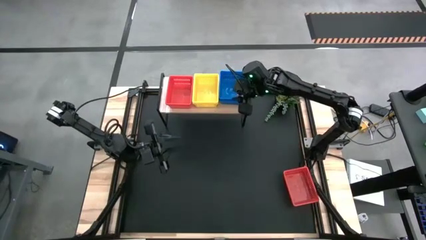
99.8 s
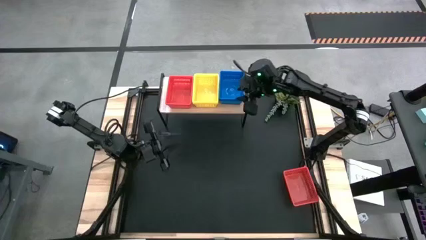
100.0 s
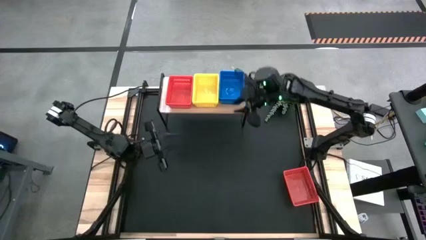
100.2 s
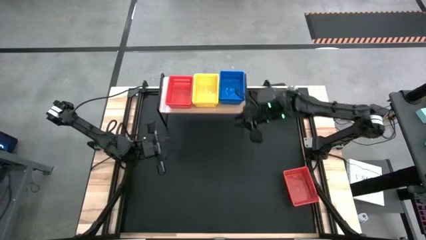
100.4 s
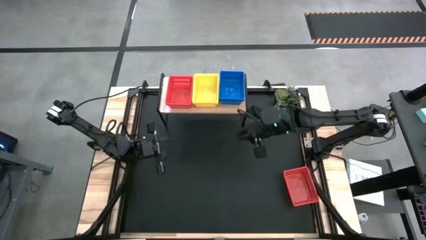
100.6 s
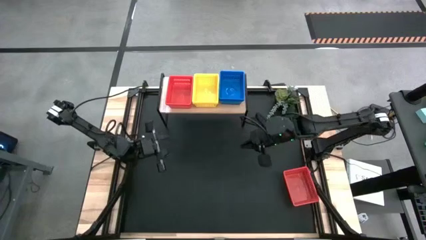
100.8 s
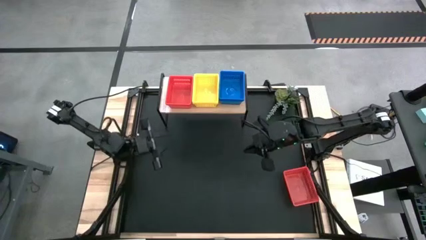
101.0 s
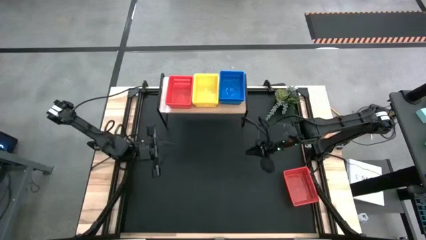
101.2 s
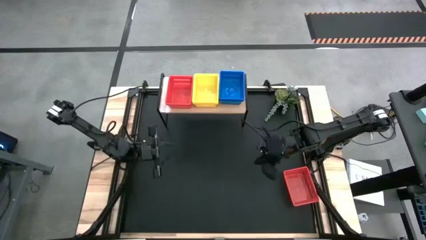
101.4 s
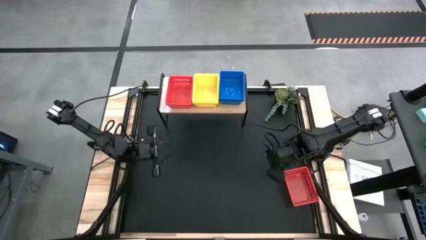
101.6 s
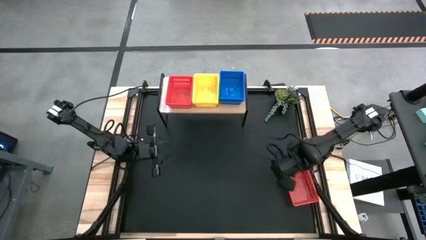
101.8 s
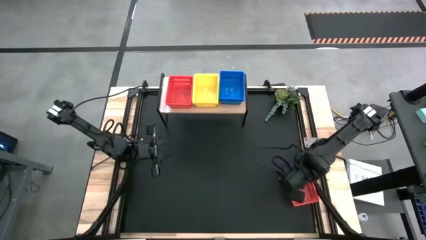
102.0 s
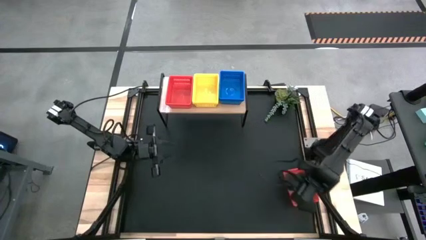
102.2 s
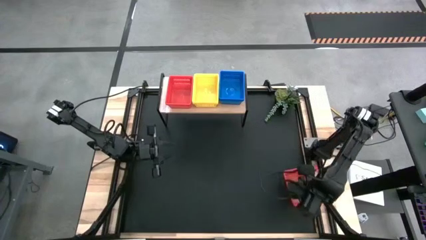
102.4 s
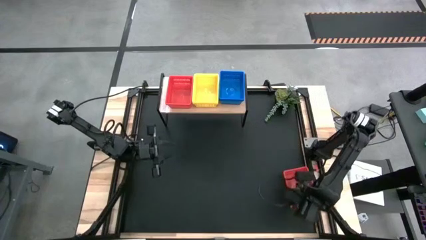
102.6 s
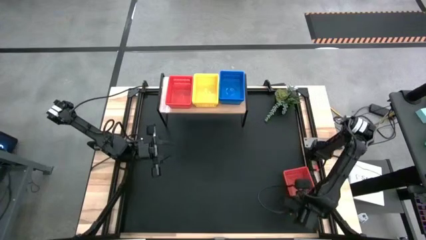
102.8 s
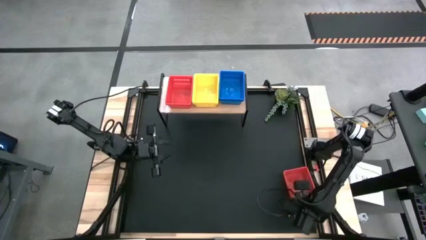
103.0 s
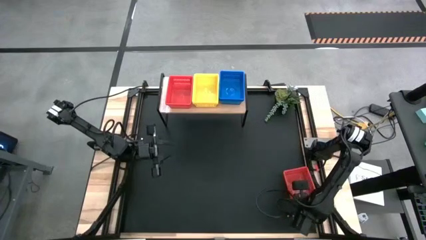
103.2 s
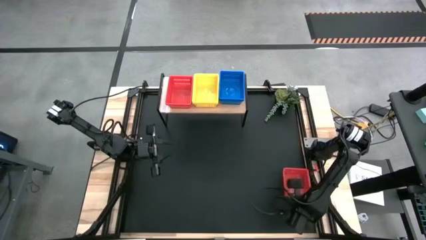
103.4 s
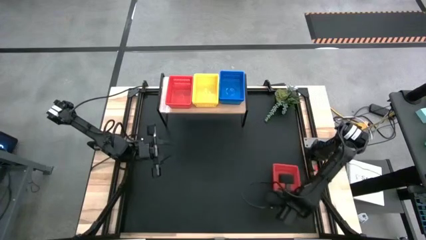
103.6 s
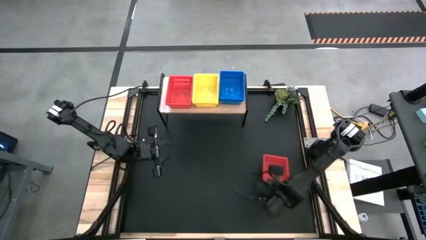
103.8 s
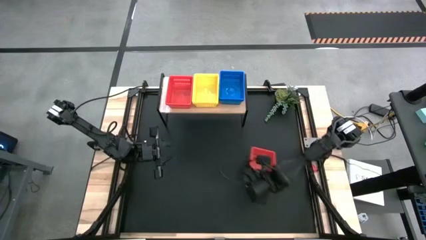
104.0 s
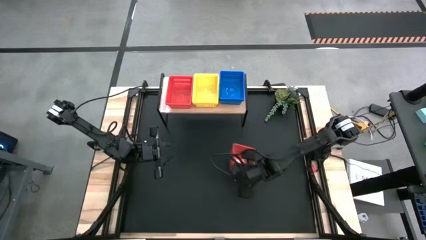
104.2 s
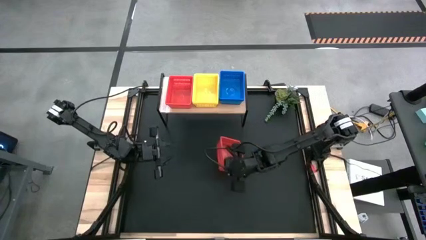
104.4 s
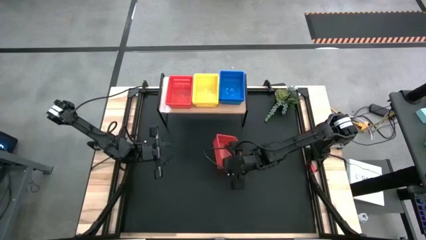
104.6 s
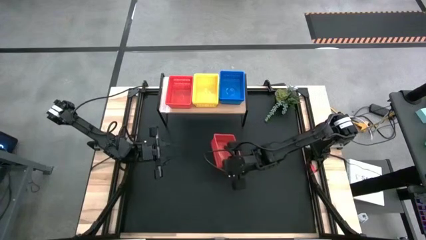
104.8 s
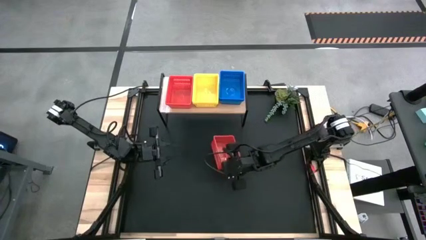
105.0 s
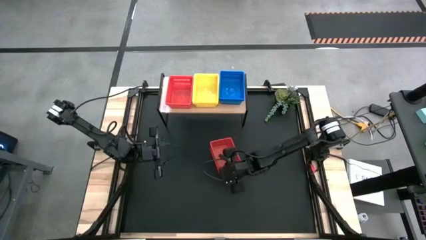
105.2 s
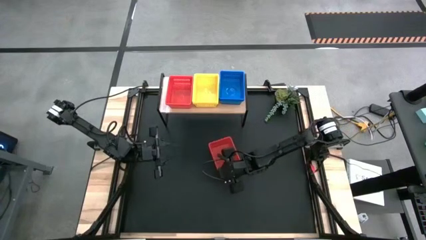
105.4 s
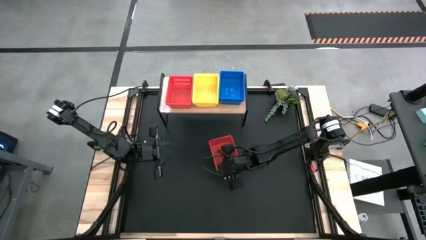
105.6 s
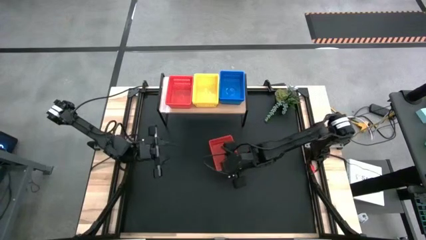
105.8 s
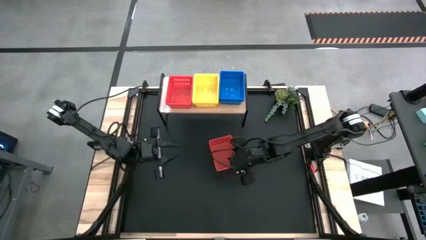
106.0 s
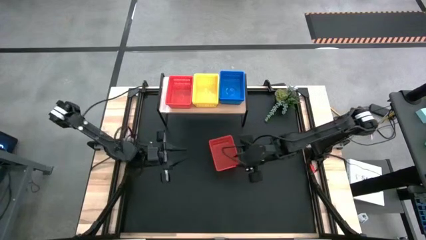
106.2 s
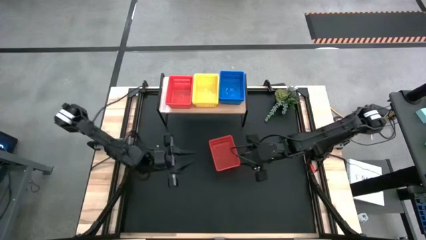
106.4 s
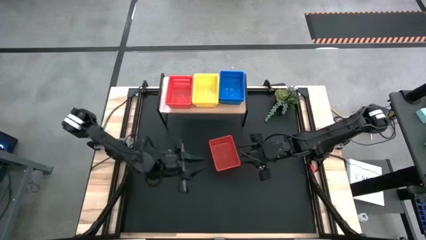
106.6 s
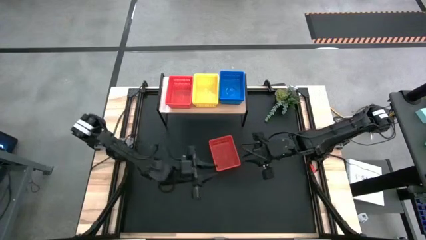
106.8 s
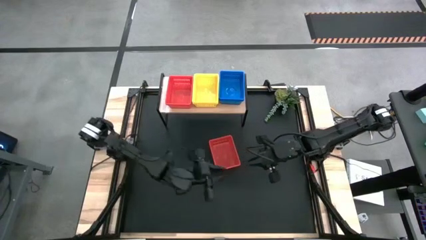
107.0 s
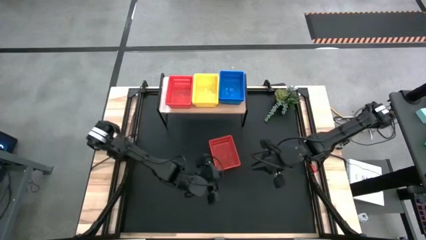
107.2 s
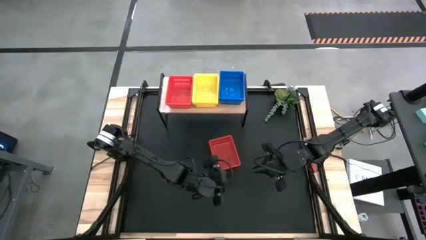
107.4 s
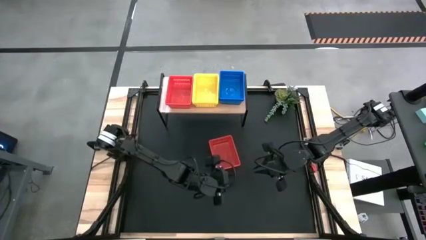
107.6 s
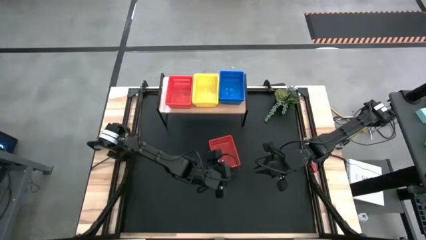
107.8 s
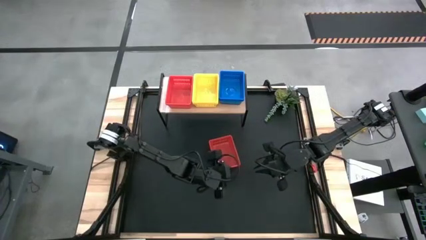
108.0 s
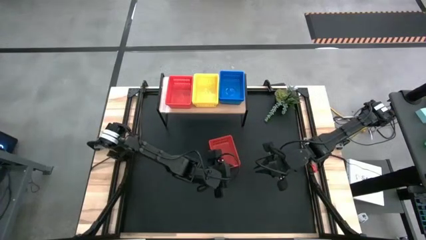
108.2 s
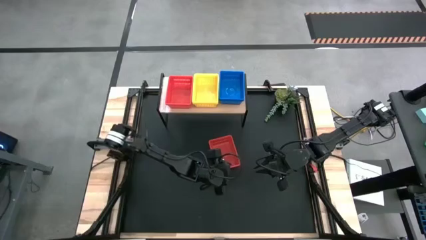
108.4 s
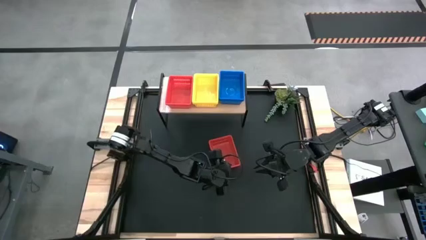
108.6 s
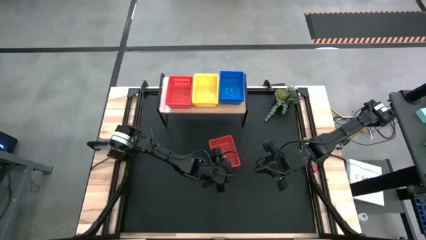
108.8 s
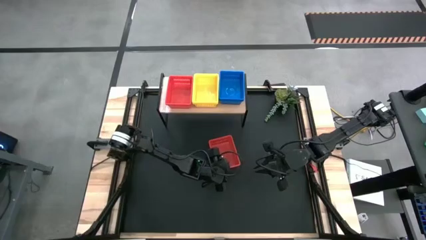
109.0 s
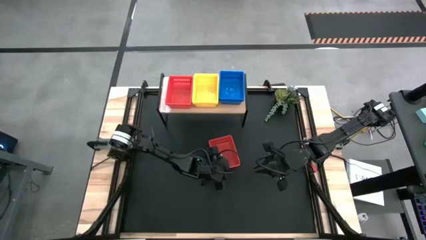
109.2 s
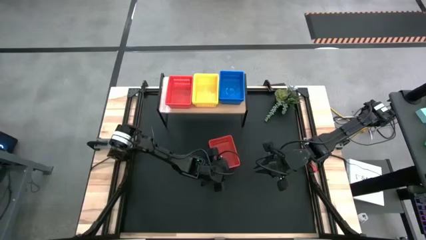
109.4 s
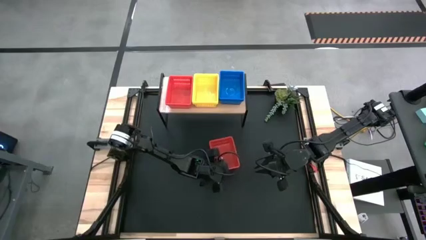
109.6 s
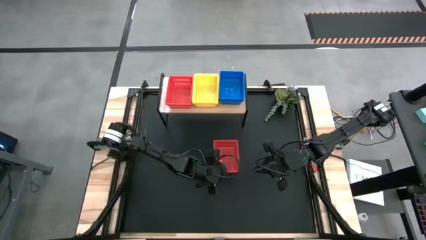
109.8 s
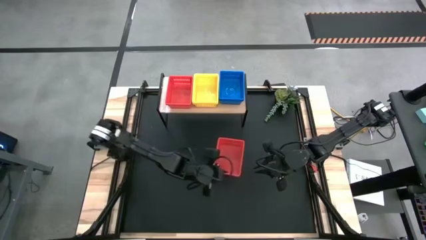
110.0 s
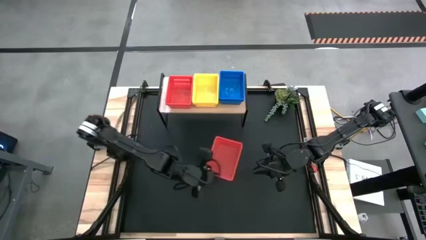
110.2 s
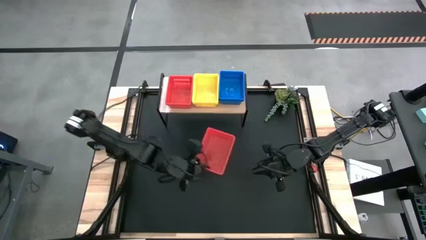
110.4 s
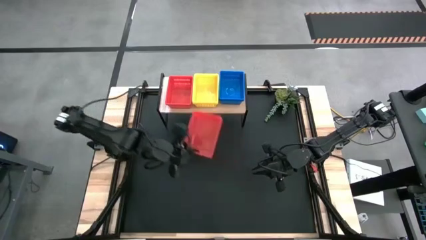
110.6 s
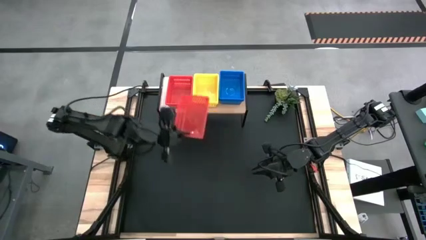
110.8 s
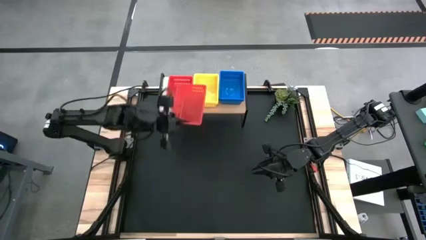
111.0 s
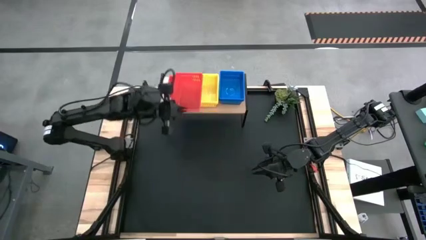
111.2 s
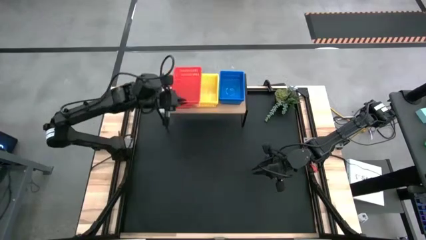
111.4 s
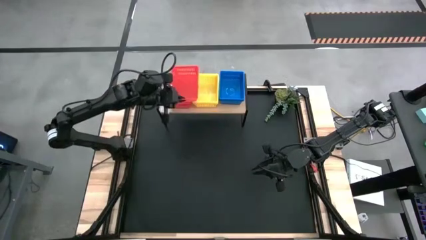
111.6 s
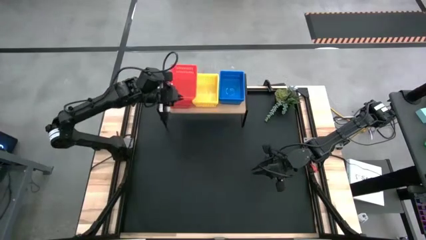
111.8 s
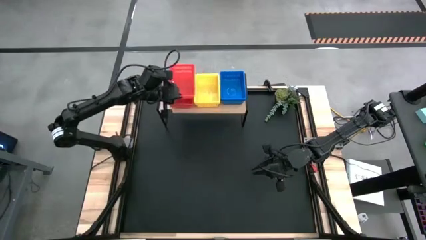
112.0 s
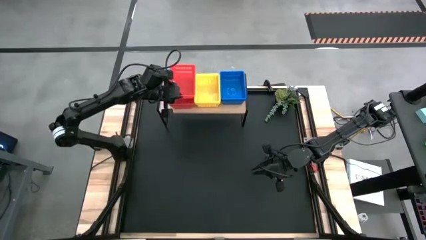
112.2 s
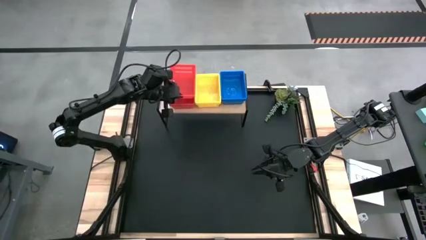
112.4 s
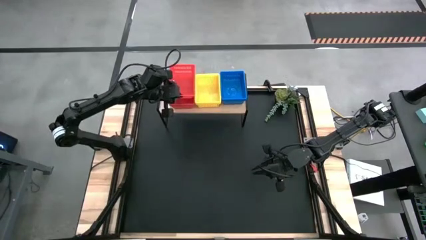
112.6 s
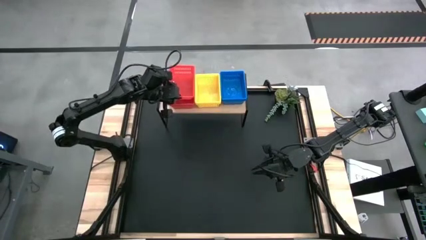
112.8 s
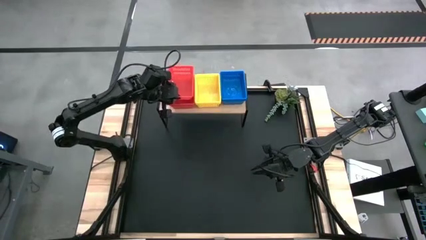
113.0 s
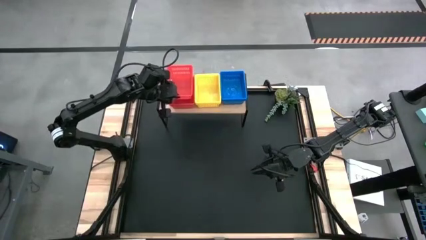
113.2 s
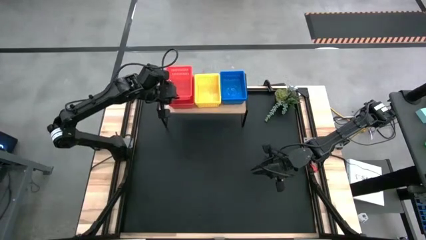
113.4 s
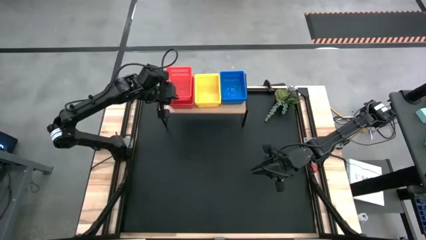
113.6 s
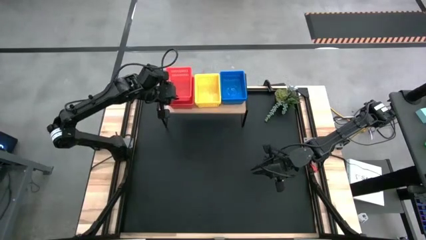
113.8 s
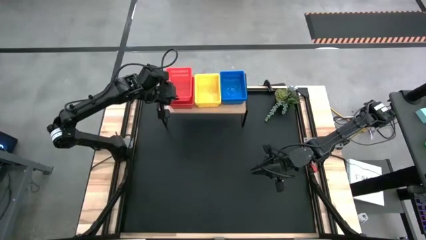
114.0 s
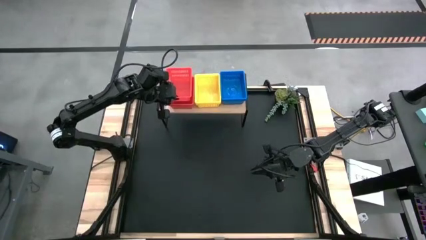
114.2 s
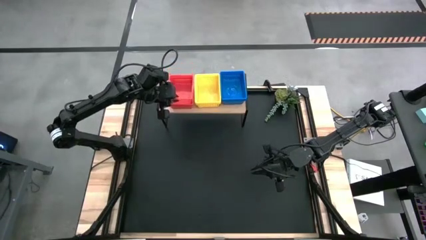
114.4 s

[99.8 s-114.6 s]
Task: Stack baskets on shelf by color
Stack the red bin on top of the red bin on the shelf

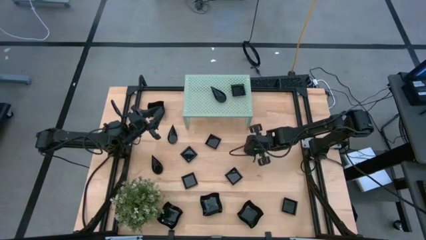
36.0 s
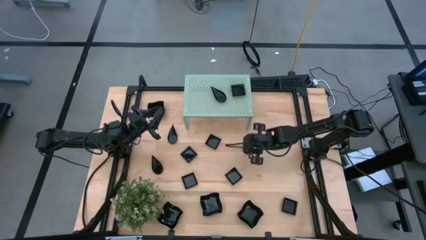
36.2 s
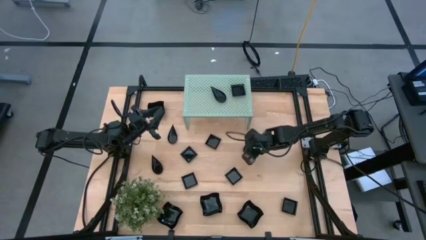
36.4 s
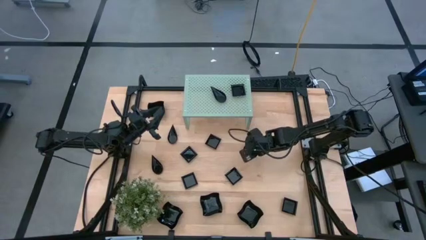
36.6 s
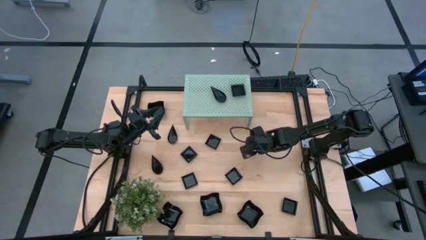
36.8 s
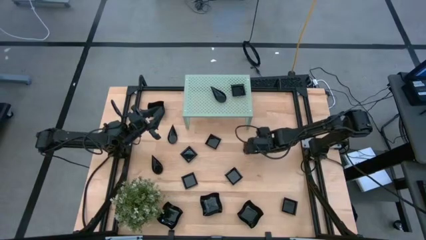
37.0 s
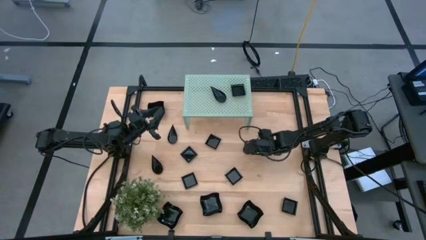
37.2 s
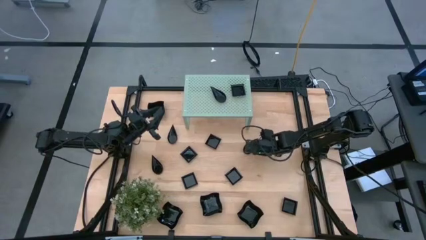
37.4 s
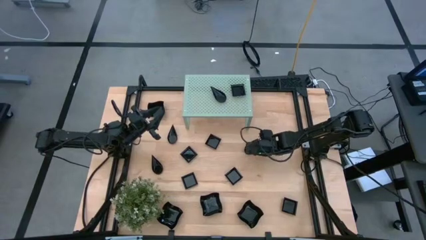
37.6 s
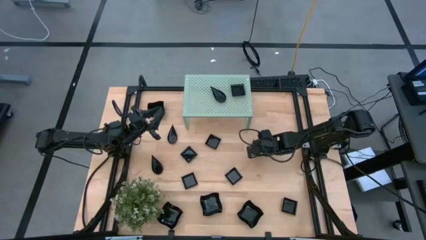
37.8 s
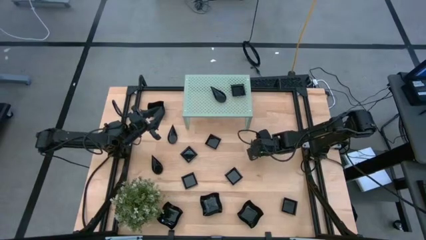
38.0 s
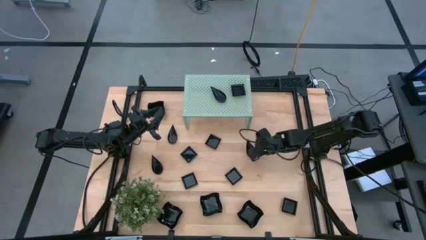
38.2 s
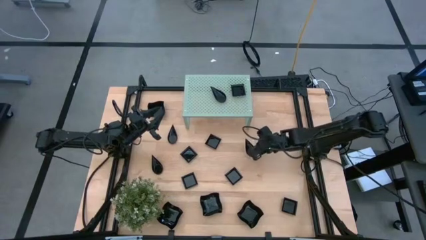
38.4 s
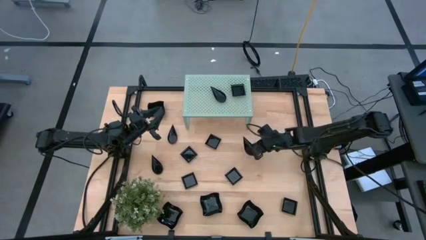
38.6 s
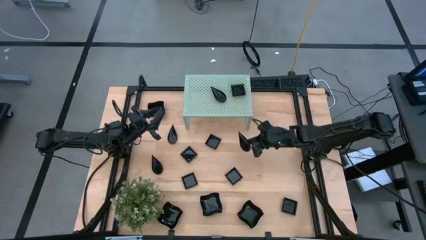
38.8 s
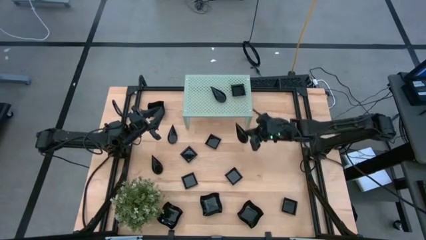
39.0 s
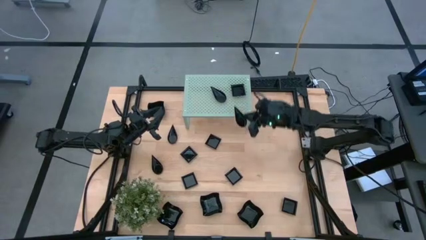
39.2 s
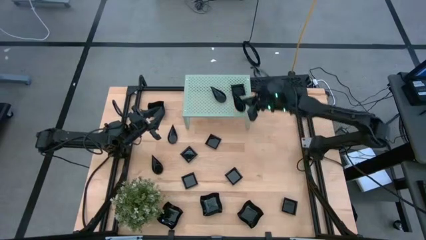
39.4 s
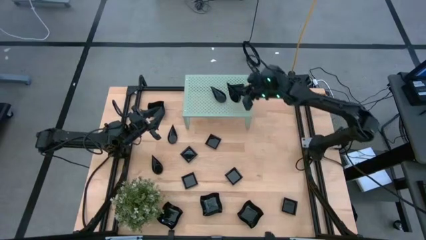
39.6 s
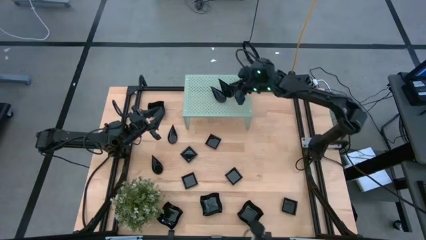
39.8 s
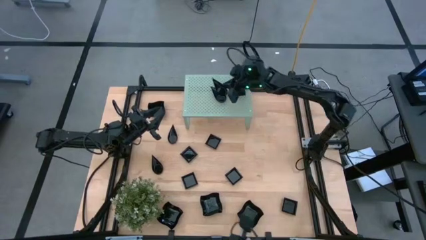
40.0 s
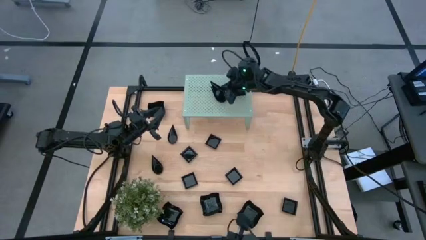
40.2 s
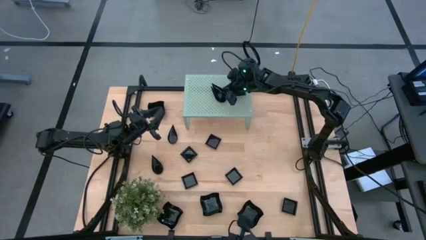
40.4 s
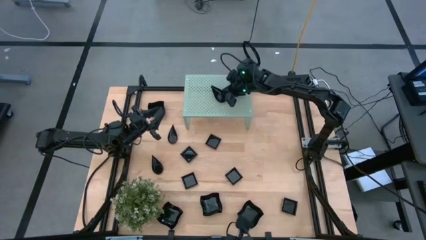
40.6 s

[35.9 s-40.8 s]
Task: Pick & Place Mini shaped plates
Stack the black drop-shaped plate on the shelf
